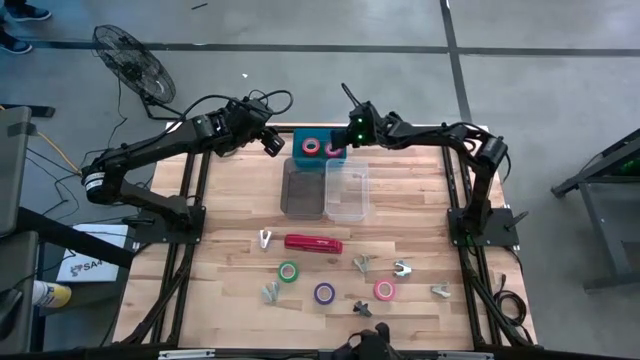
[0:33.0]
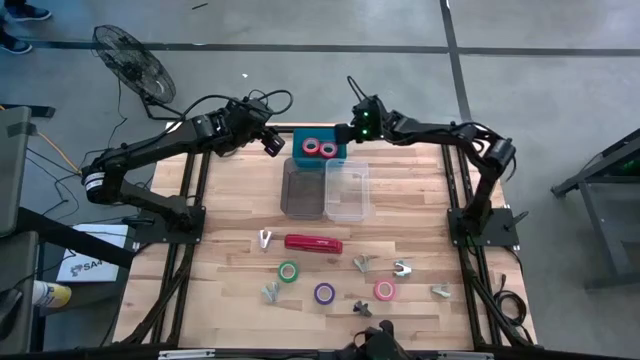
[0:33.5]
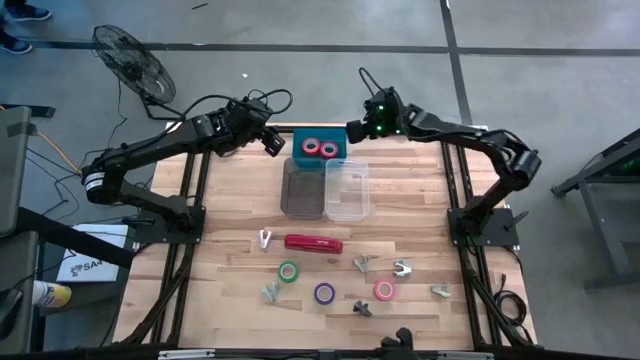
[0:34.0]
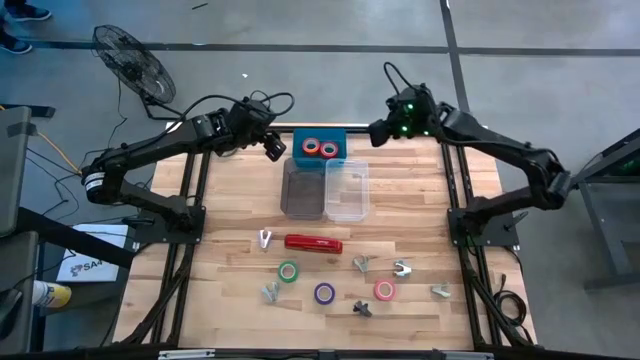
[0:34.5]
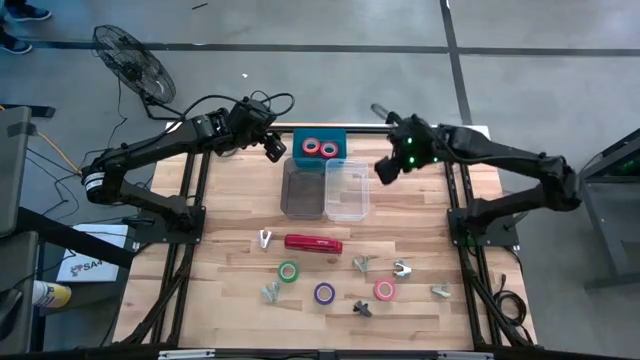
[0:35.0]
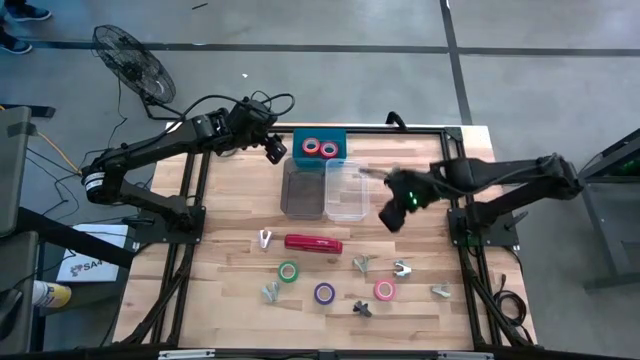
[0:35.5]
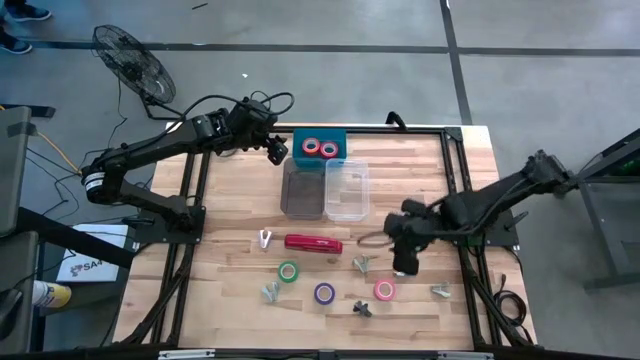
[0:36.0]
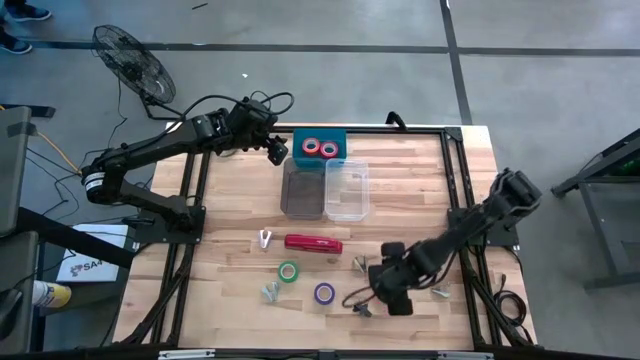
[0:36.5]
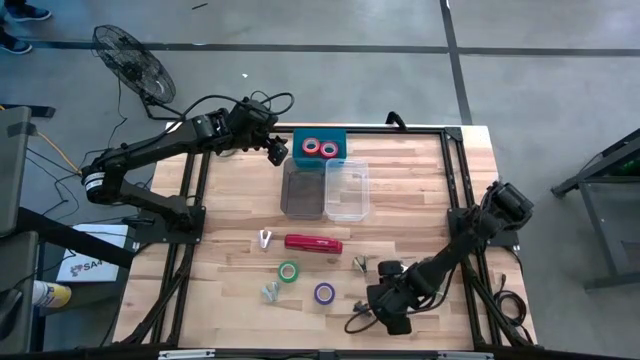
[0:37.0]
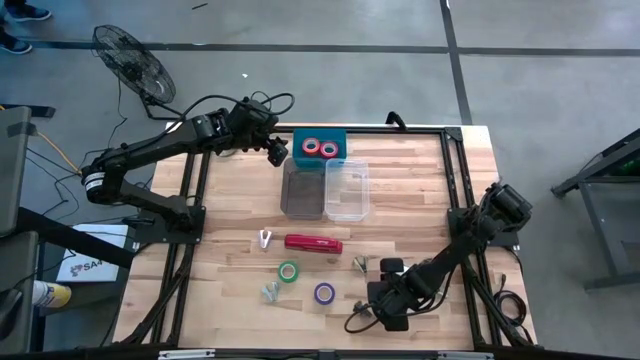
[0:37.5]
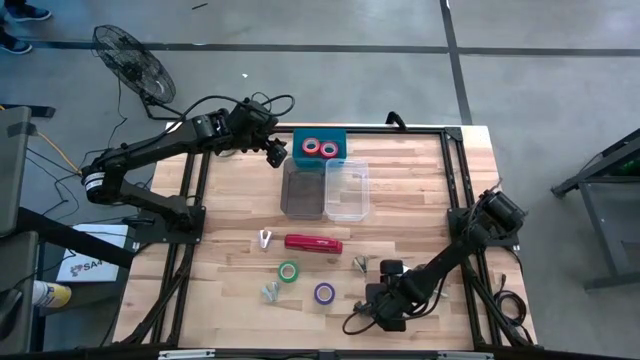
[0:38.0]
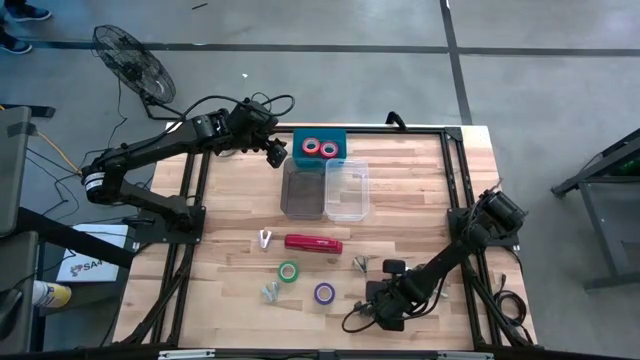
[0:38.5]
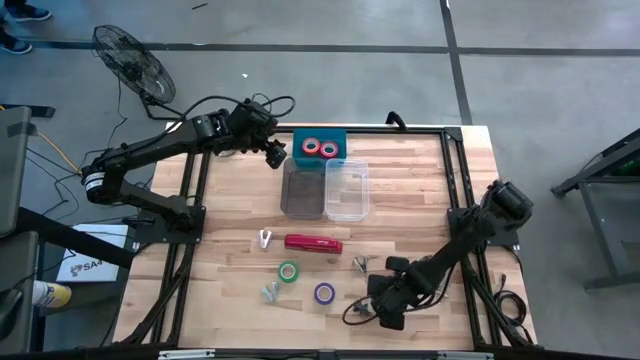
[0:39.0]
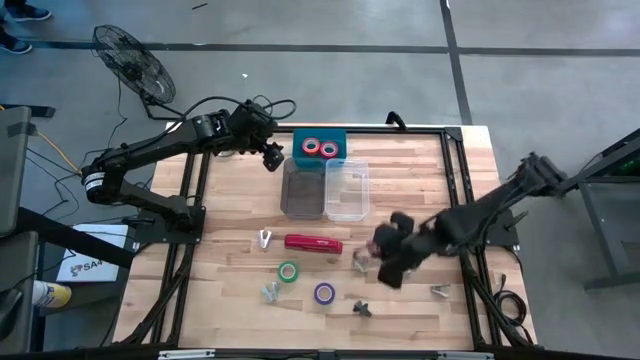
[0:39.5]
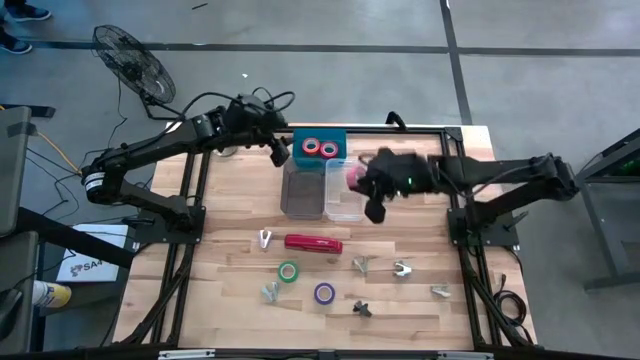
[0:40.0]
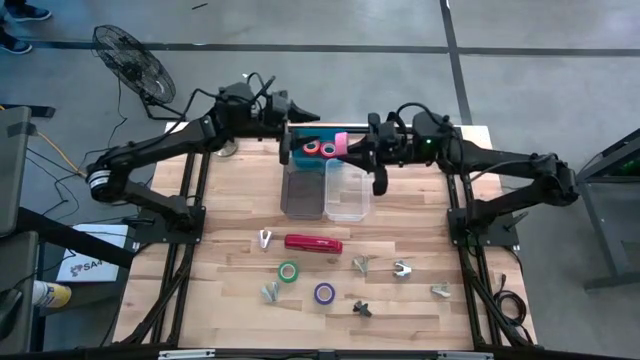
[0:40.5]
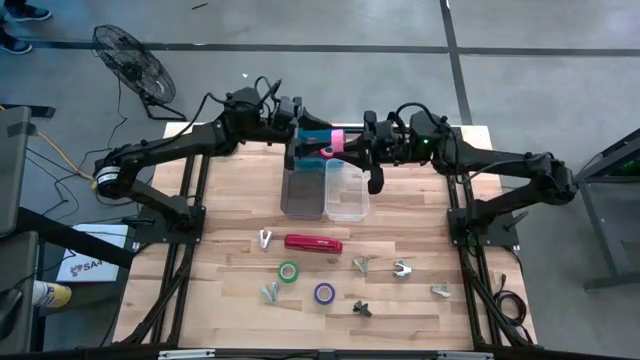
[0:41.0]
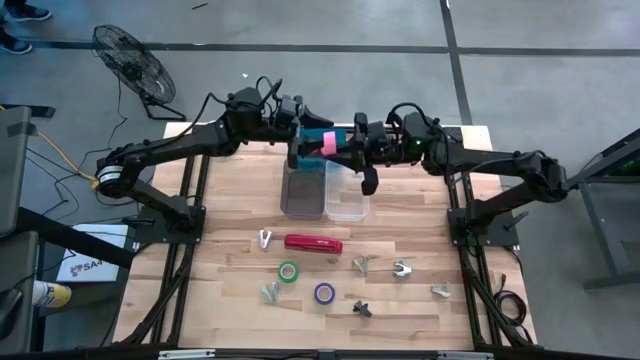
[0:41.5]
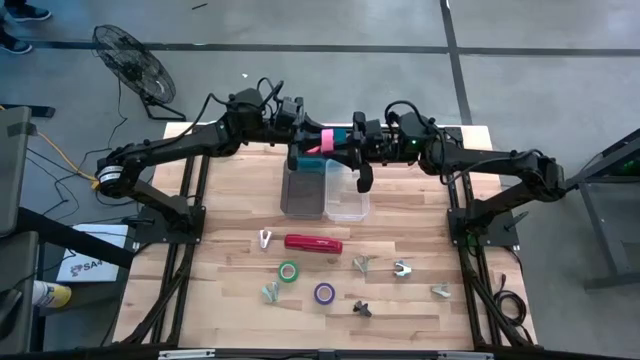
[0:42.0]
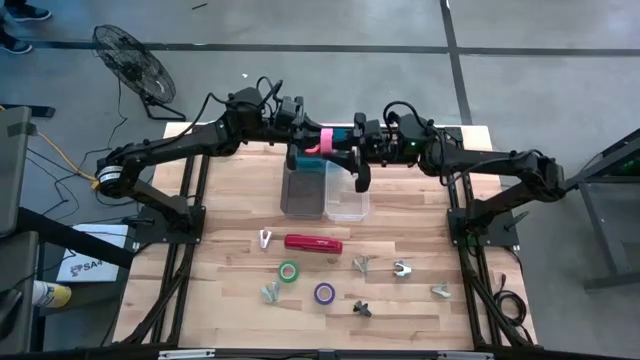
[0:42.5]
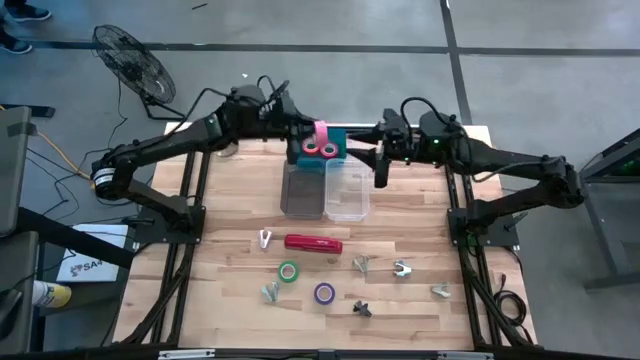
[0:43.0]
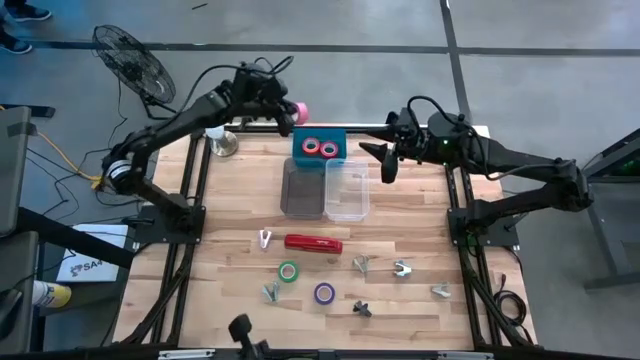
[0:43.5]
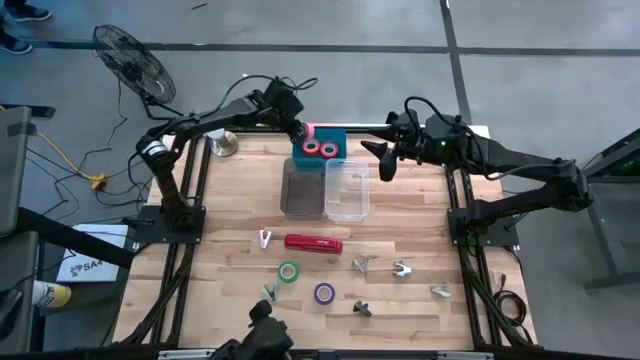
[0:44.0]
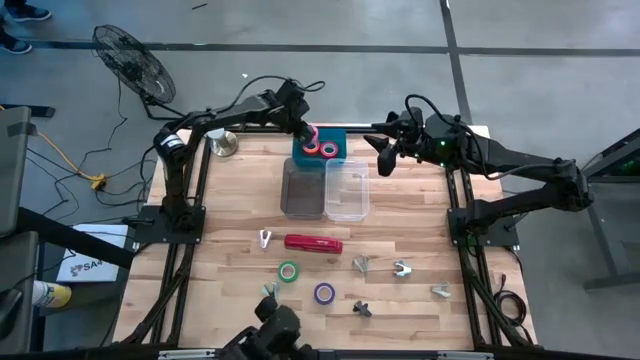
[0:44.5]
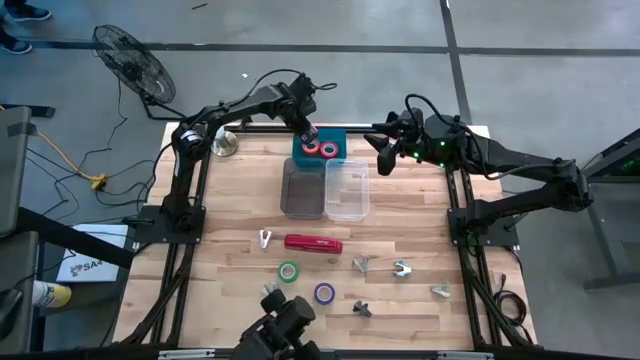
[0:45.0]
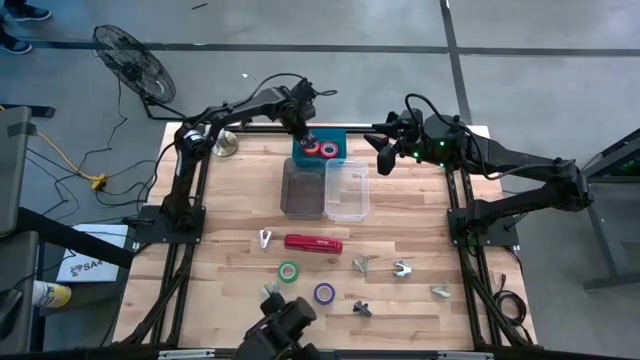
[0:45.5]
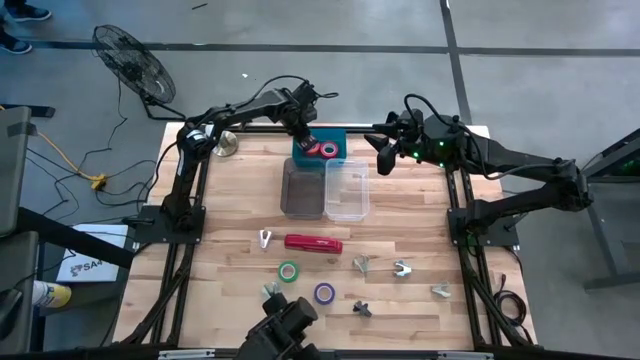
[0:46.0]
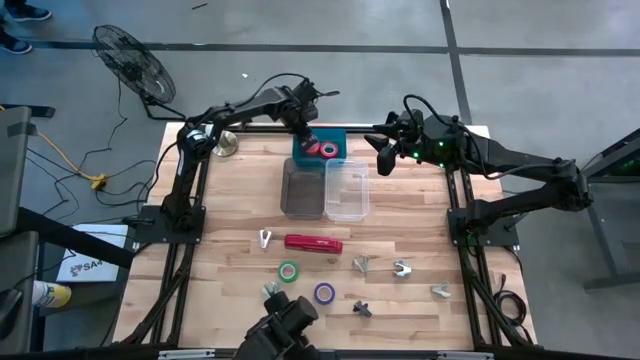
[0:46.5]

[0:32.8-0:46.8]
Task: Pick and place Stapler, Stapler remover, tape
Put the pink tape into the blue bin

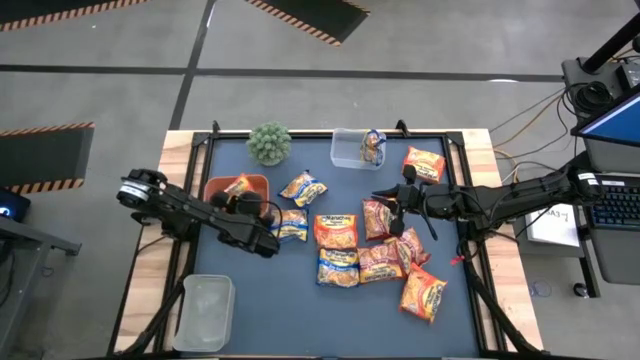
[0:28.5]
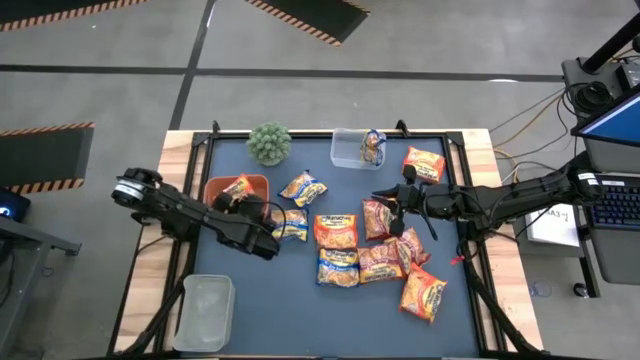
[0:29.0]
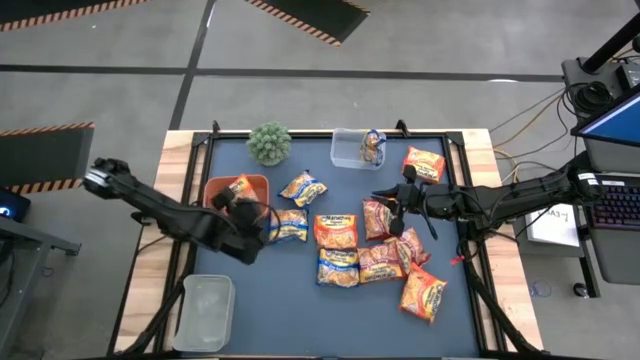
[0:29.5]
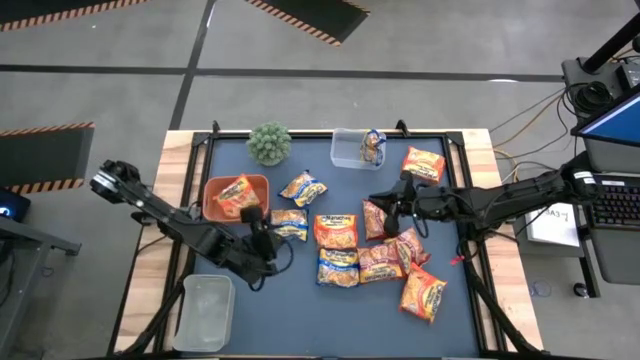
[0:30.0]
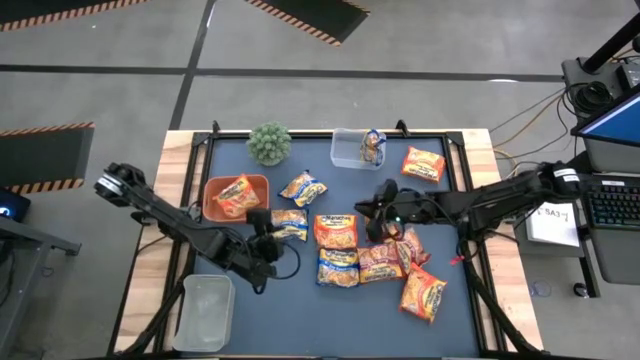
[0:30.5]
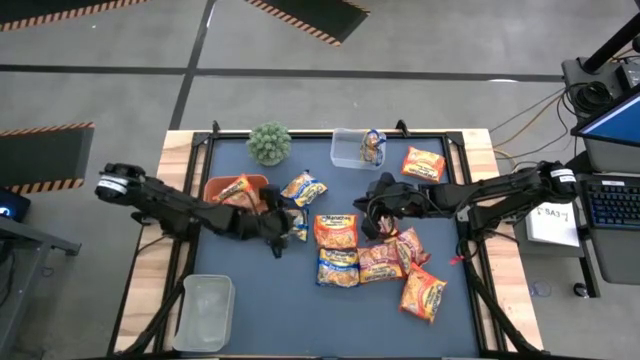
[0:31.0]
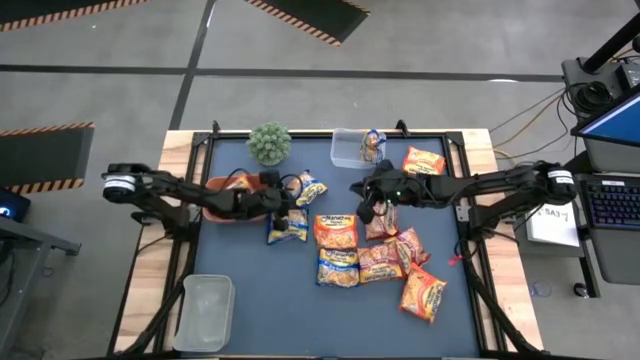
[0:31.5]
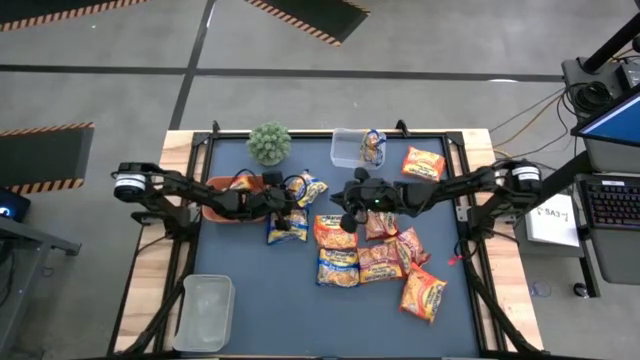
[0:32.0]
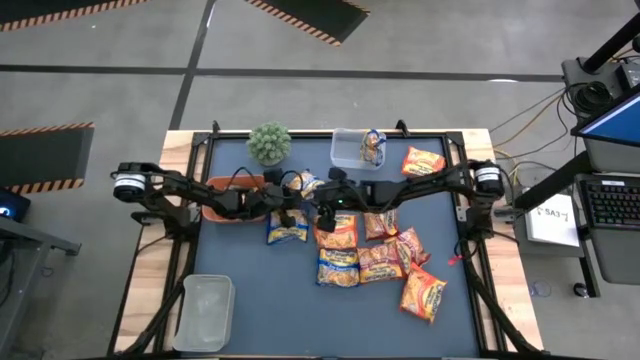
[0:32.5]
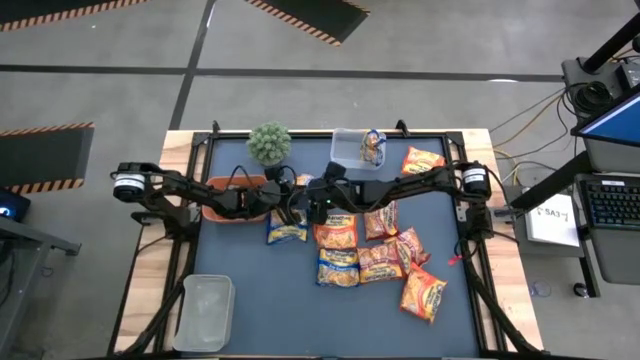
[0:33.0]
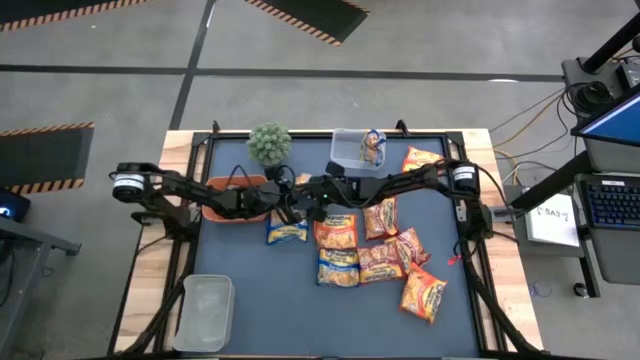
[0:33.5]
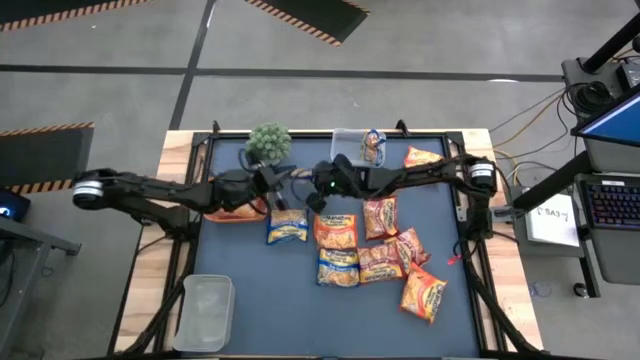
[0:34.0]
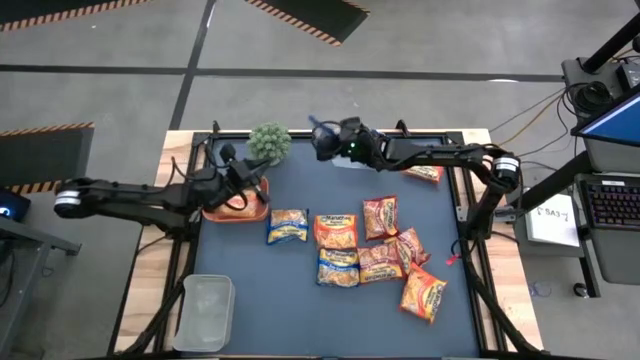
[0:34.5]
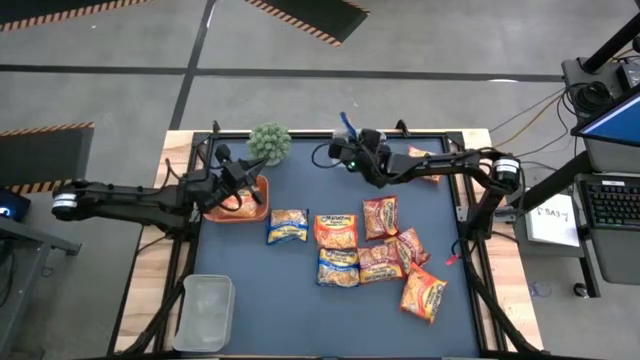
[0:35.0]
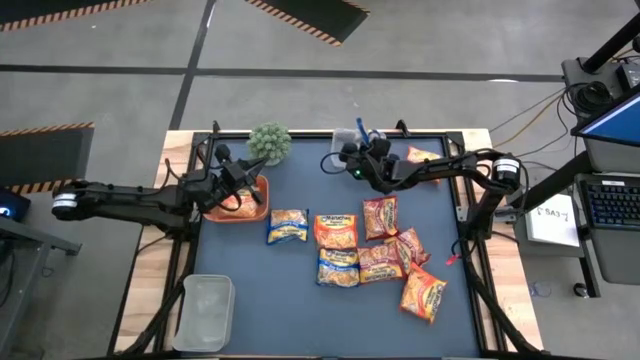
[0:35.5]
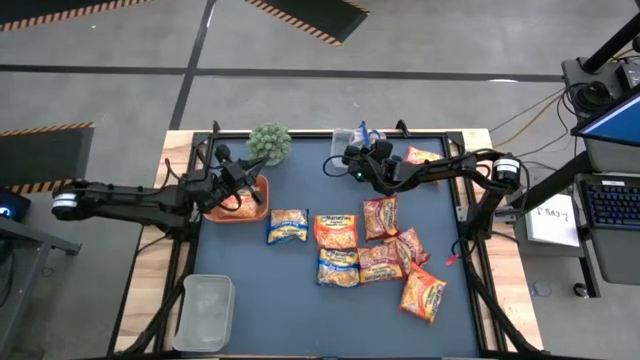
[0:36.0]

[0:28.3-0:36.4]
Task: Sort Maruchan noodles
Put the blue noodle pack into the transparent bin
